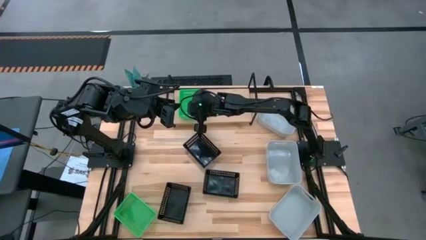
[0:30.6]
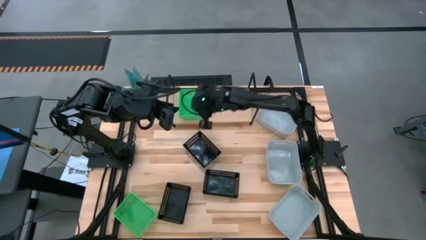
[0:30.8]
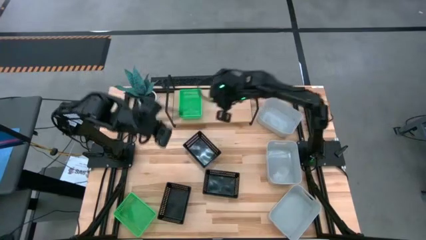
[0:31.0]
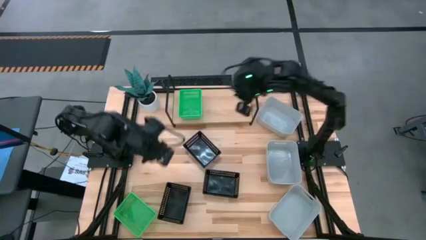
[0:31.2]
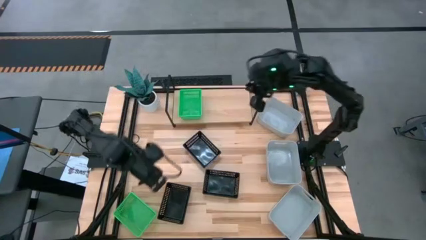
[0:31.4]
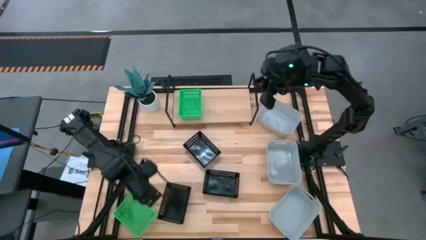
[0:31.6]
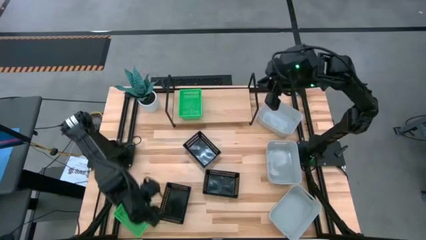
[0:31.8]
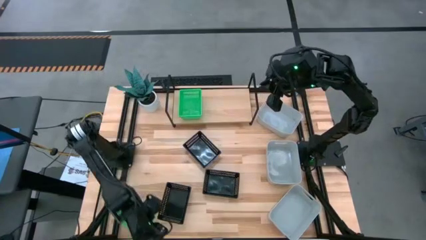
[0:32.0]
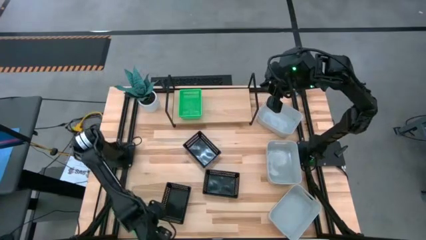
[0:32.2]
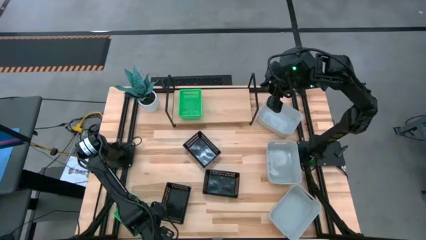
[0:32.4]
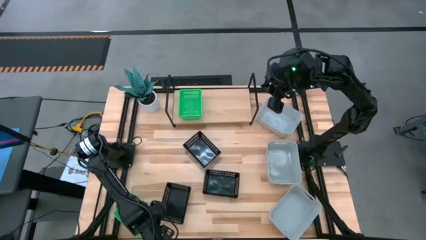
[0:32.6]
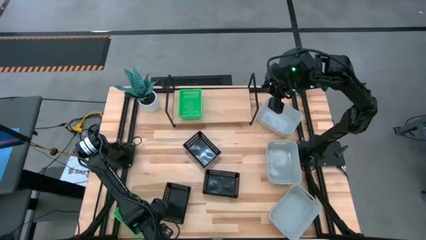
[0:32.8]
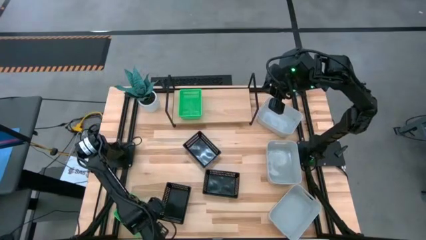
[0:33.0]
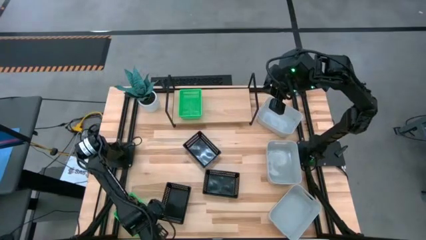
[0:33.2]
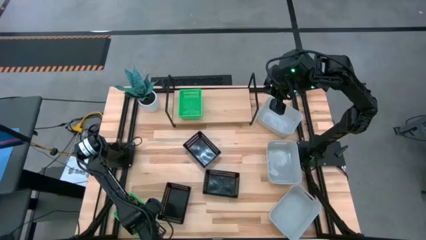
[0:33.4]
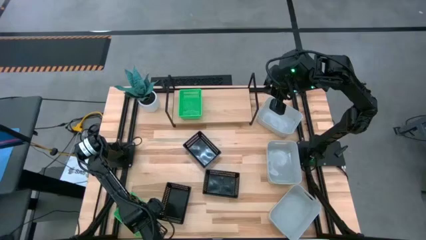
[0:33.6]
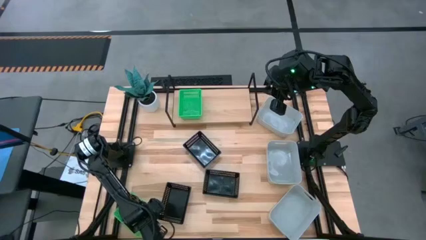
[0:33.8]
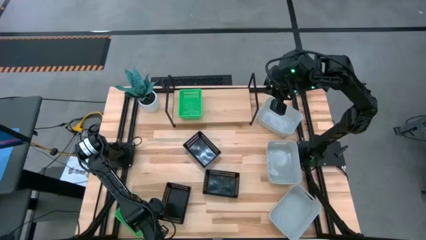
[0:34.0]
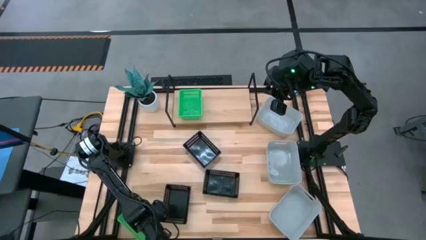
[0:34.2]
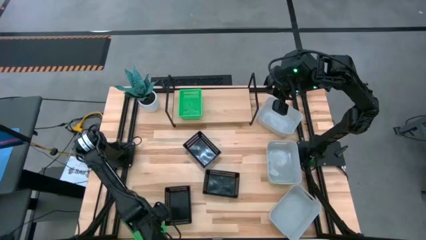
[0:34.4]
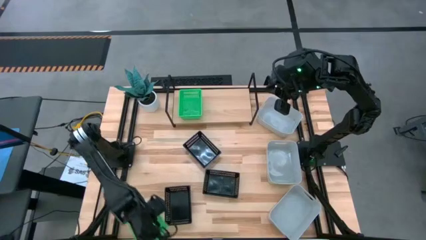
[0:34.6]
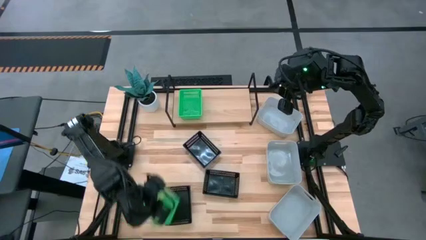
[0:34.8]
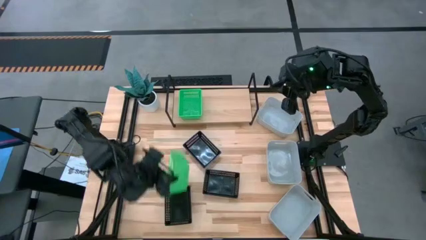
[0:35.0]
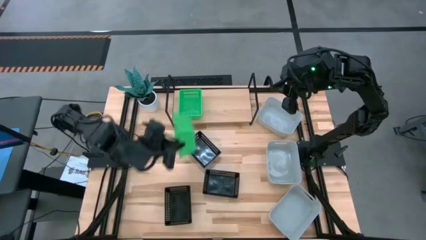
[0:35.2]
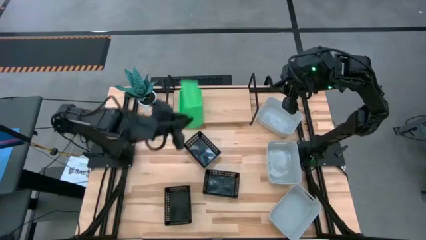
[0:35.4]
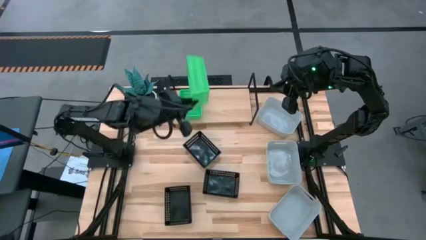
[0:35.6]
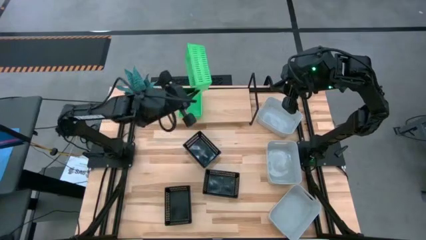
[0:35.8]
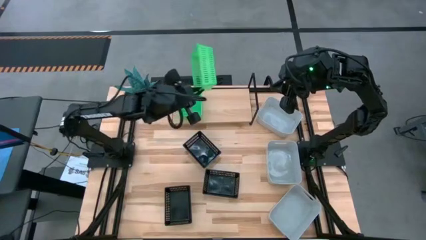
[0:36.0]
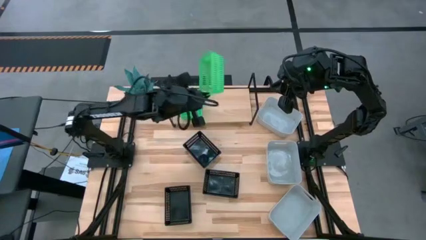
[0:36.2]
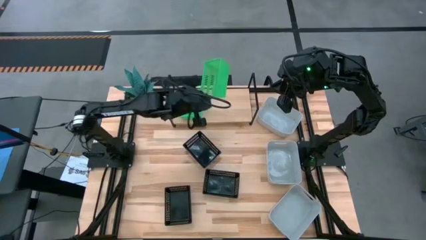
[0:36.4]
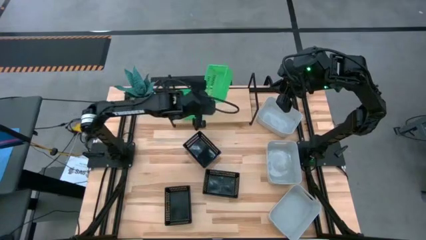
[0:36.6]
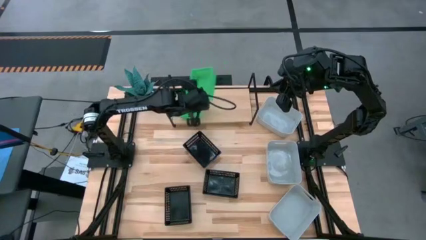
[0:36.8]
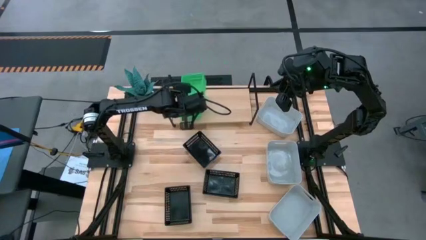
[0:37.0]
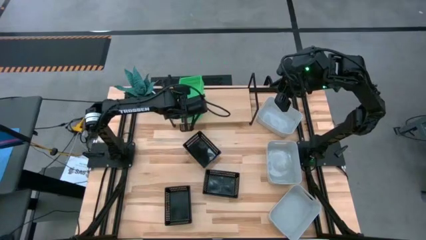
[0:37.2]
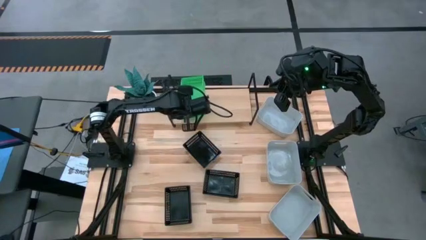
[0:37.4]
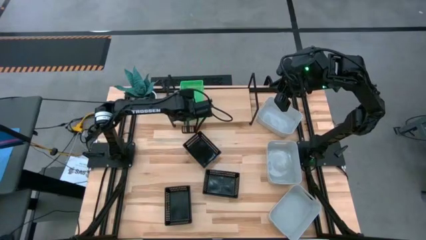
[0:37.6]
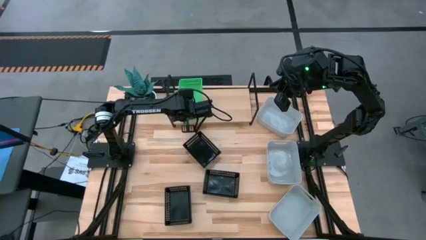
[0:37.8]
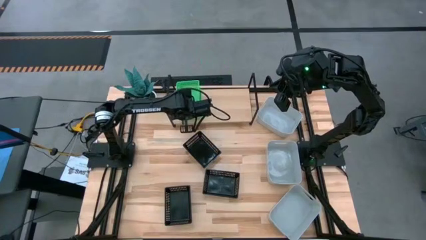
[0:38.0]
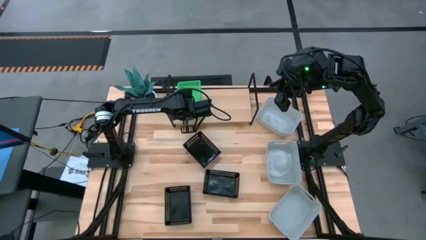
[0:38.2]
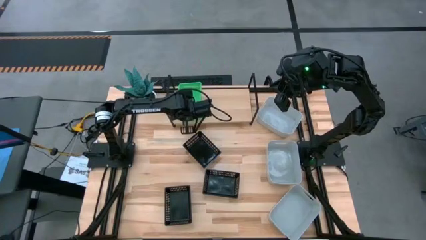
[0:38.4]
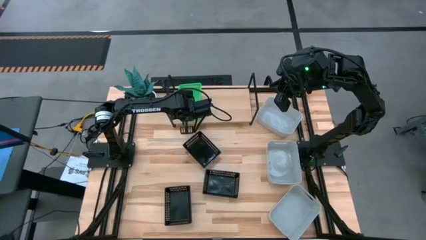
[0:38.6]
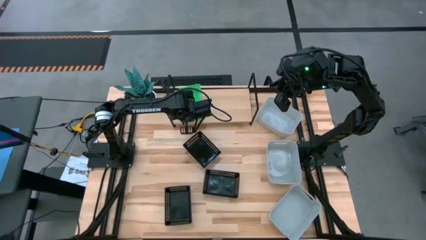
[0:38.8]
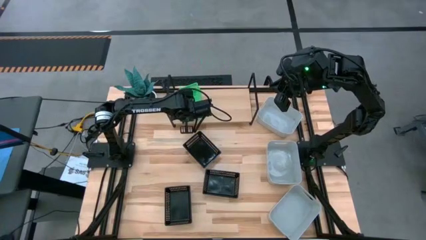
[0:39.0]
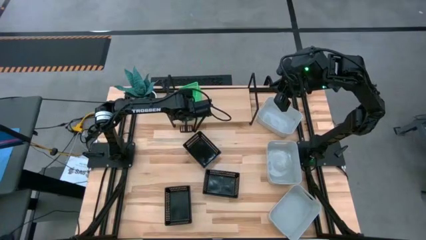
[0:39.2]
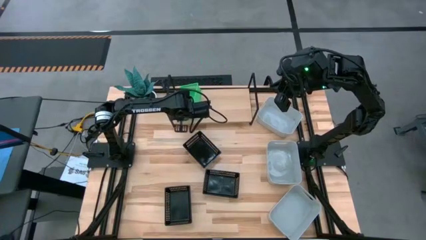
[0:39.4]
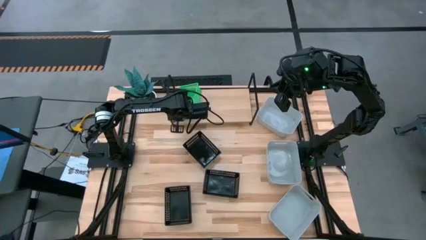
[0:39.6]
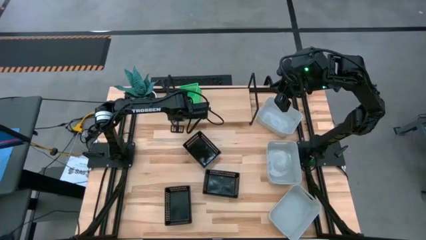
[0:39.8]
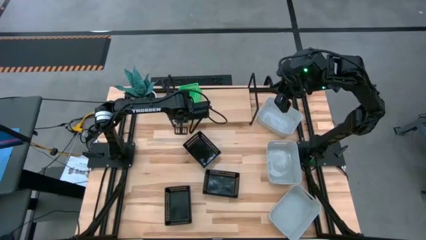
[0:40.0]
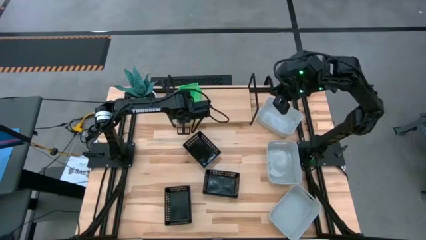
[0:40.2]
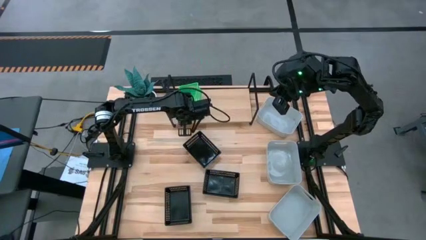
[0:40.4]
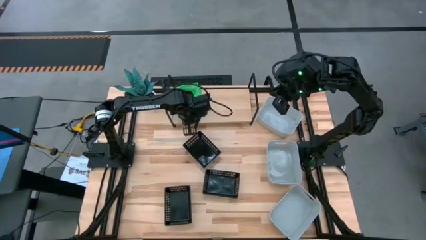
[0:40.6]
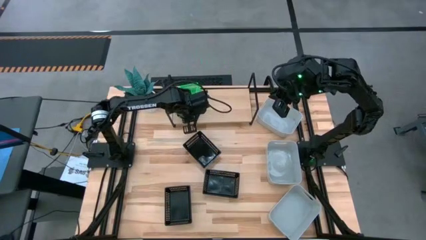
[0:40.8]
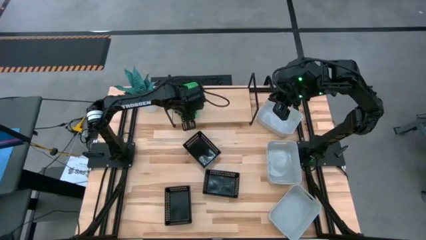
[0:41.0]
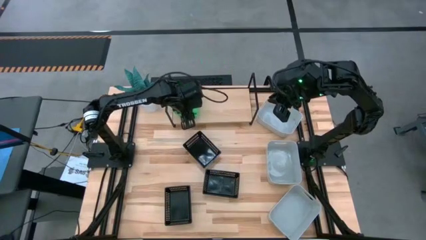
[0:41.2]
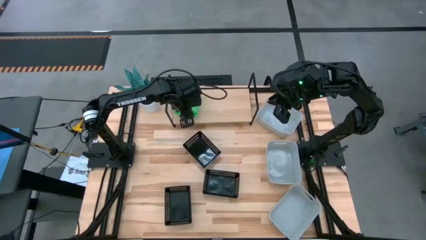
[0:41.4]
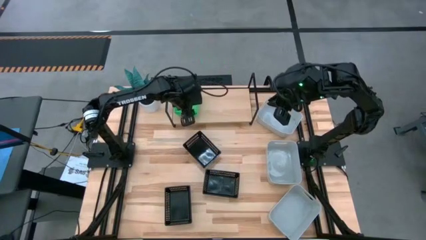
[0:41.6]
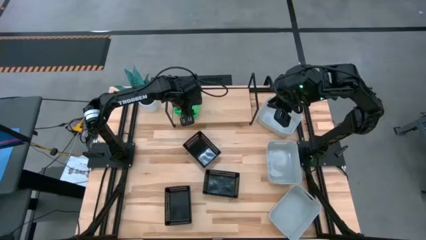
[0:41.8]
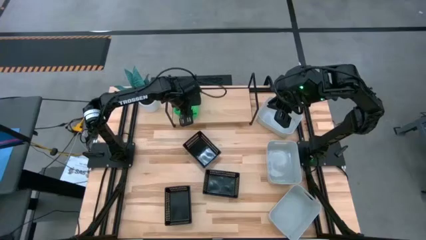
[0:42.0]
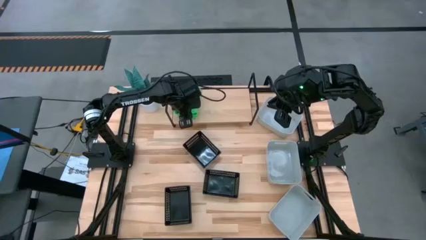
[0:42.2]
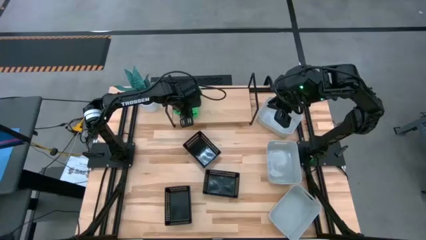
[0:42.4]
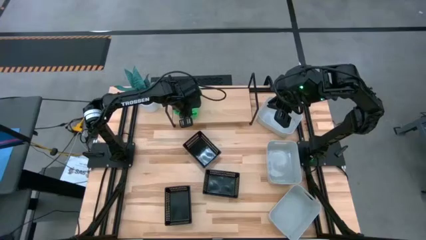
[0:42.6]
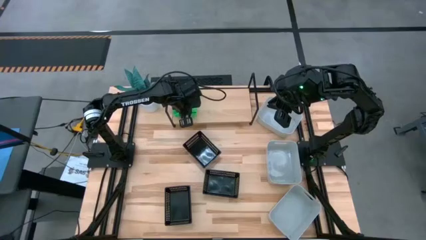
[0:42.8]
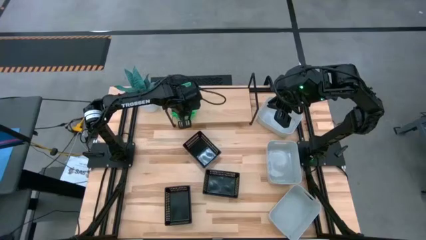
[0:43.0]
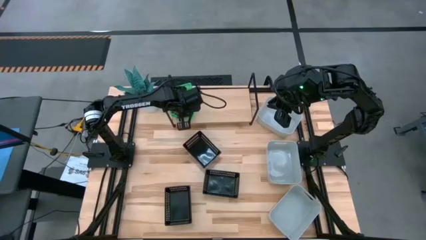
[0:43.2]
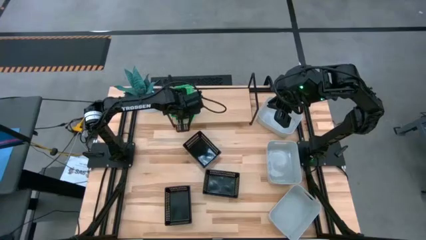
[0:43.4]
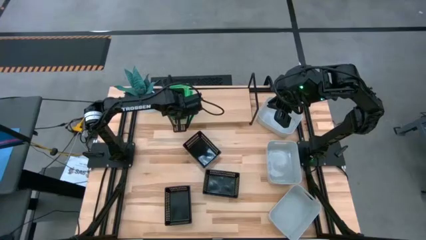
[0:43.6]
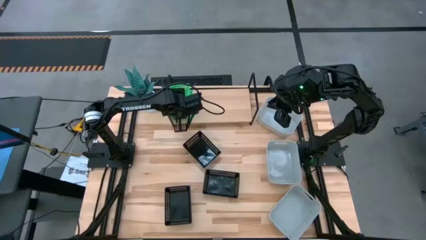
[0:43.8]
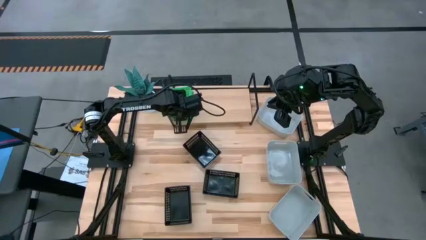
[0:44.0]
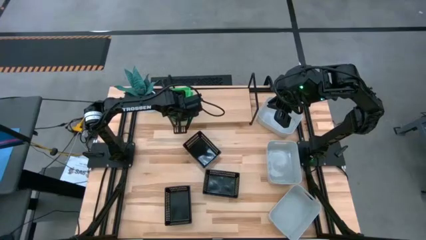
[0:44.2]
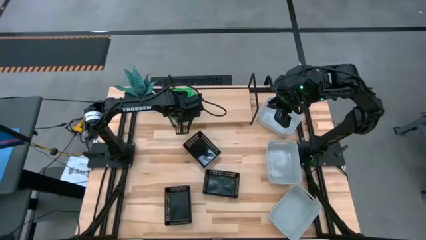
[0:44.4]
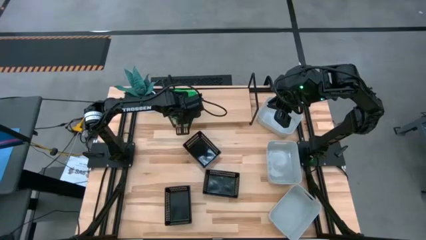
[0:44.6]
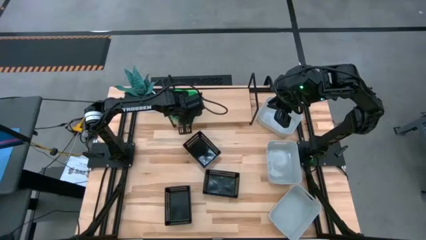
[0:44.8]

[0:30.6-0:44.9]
Task: Stack baskets on shelf by color
Stack the green bin on top of the green bin on the shelf
